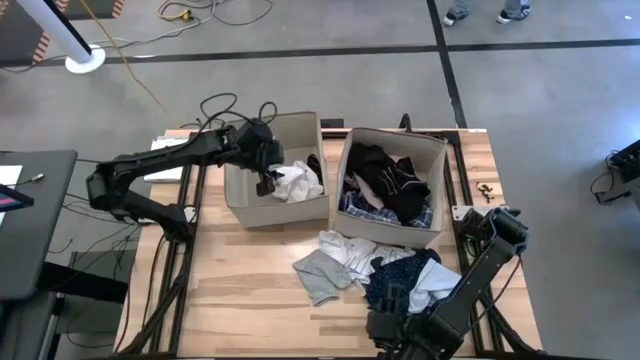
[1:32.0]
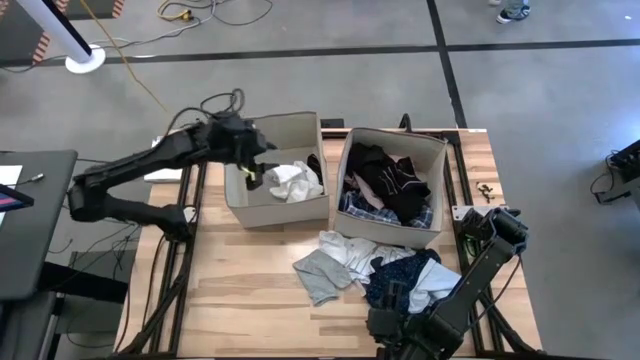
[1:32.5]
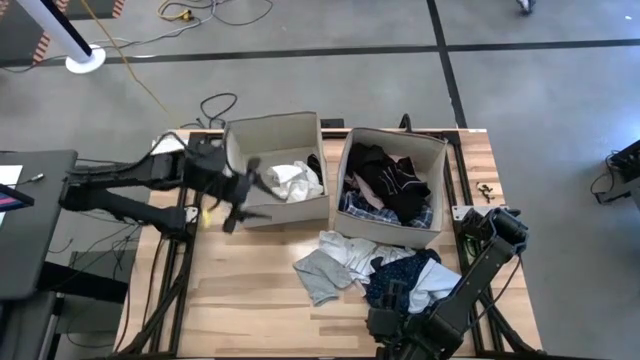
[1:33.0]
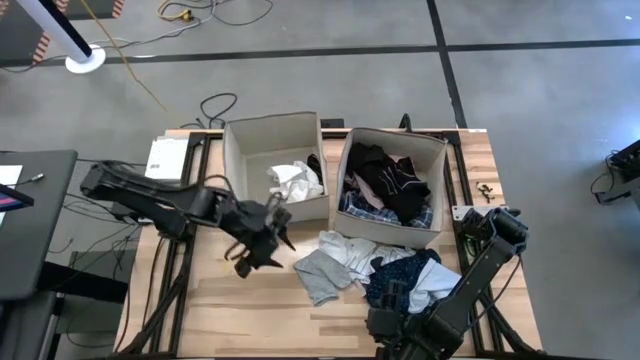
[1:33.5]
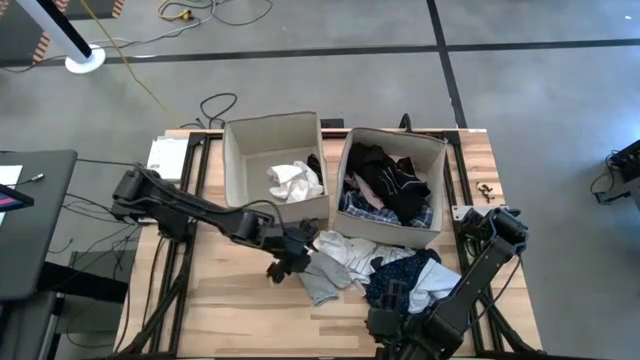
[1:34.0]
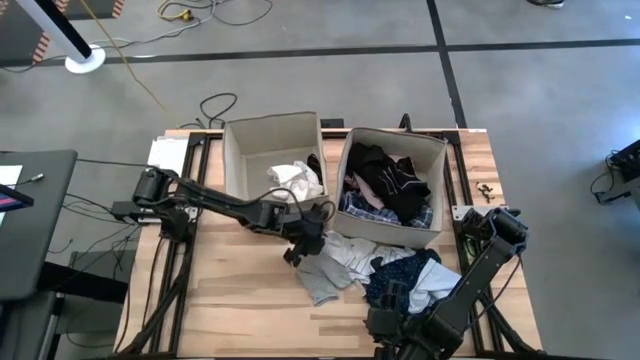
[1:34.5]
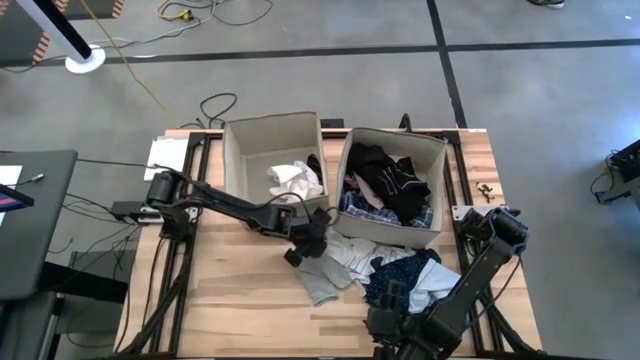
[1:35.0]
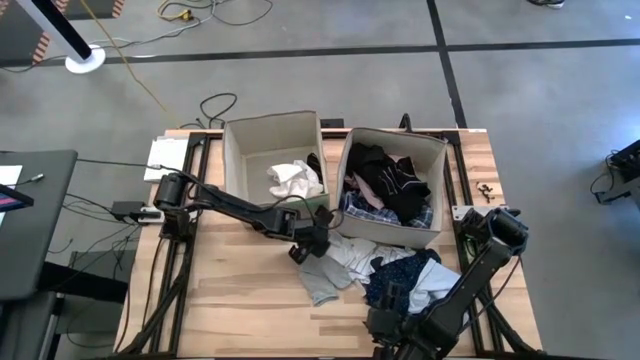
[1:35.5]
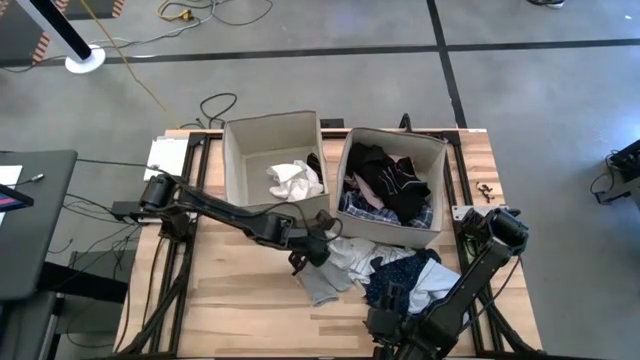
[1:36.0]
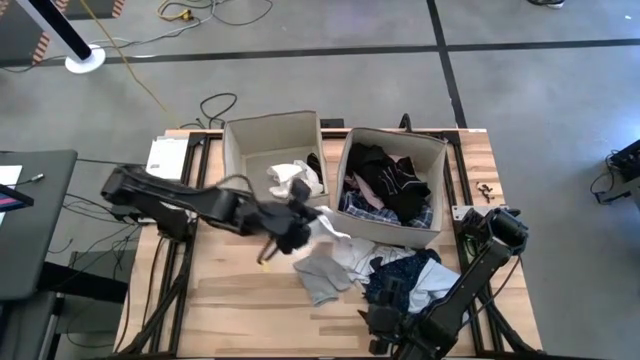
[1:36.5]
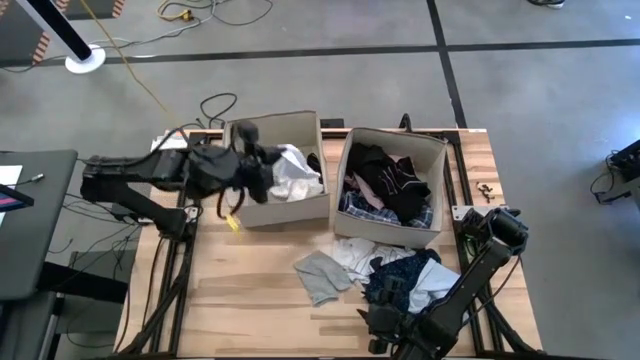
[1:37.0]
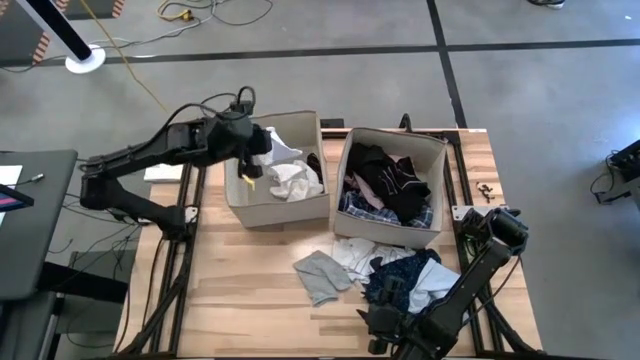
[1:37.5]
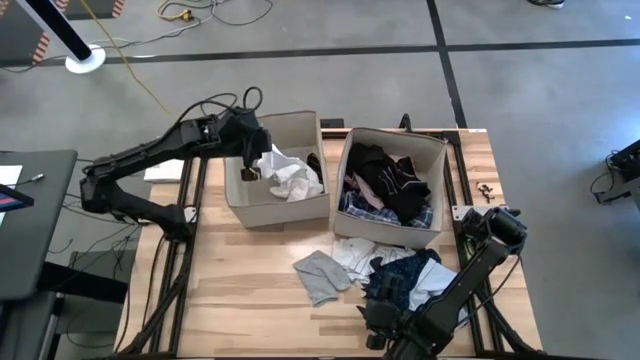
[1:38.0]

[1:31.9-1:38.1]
Task: Sort clothes
Put the white sock into the left white laundry bin

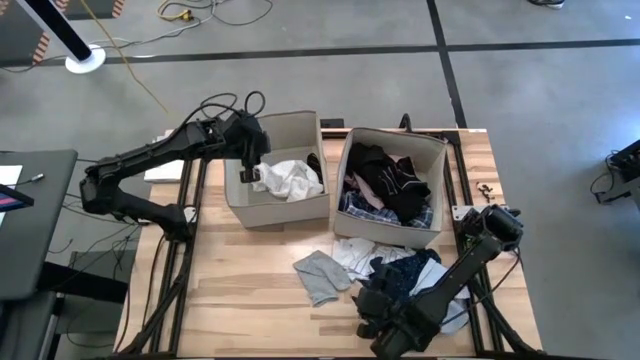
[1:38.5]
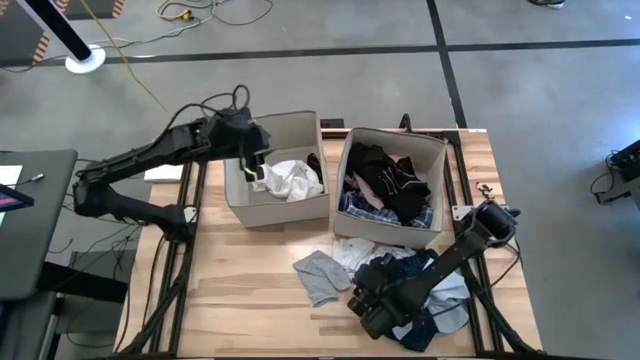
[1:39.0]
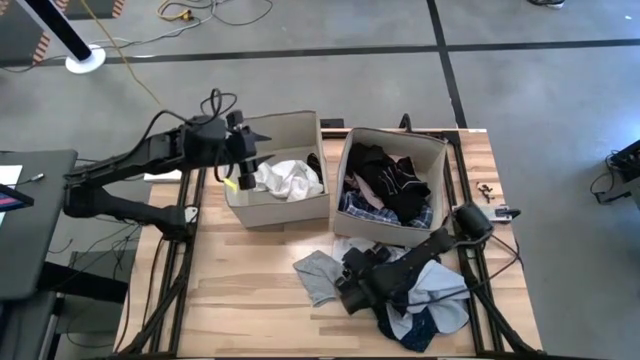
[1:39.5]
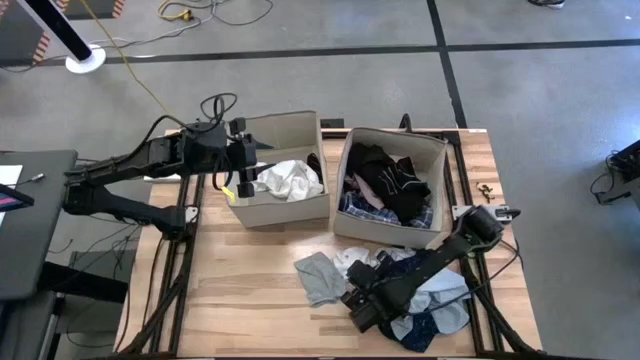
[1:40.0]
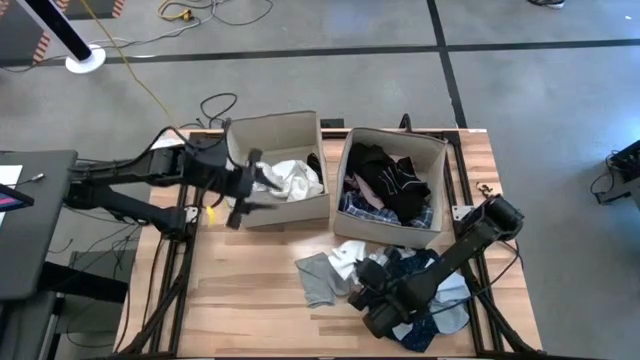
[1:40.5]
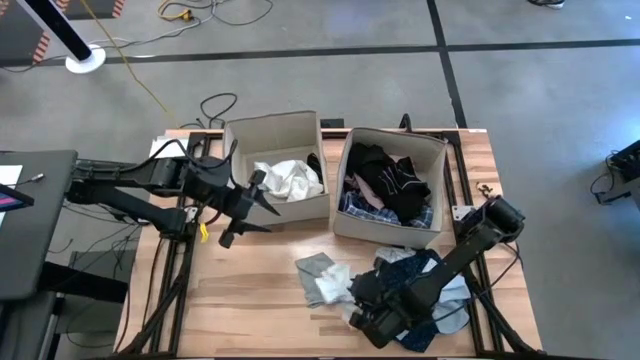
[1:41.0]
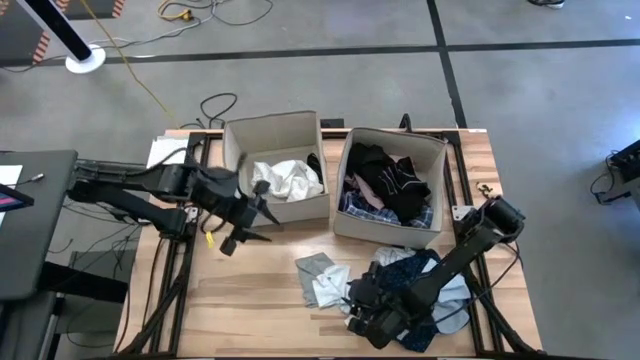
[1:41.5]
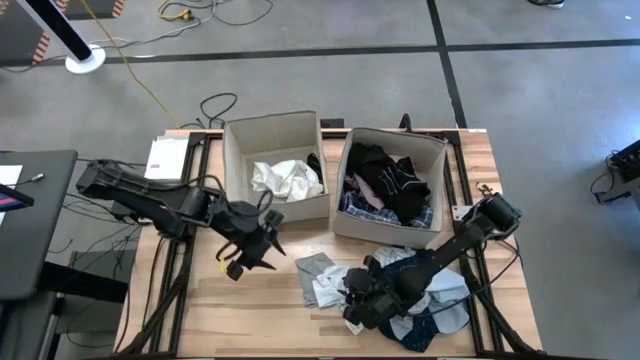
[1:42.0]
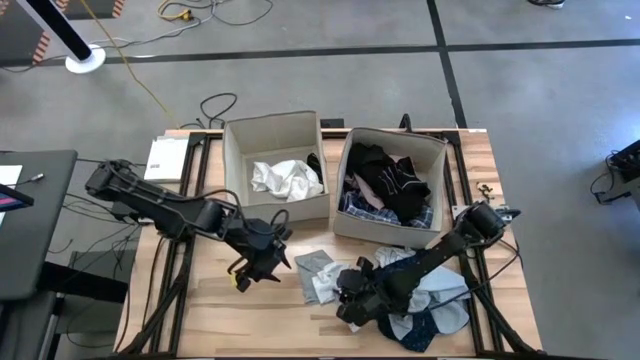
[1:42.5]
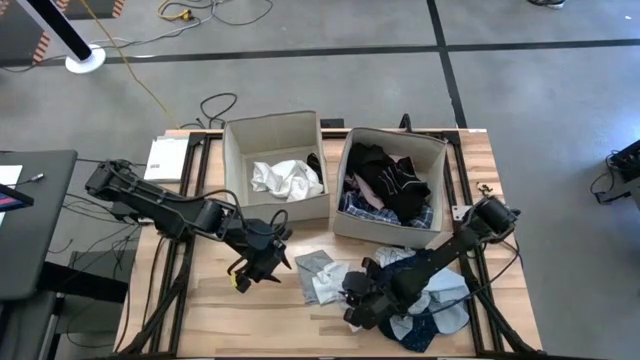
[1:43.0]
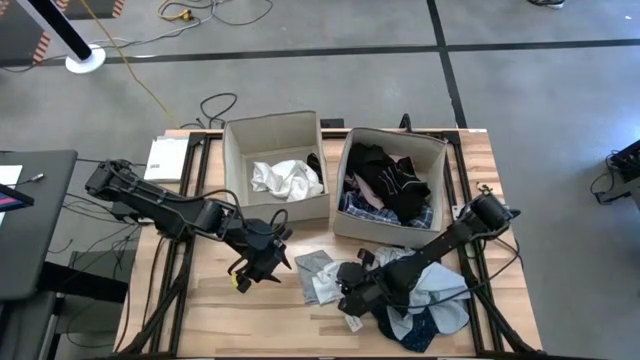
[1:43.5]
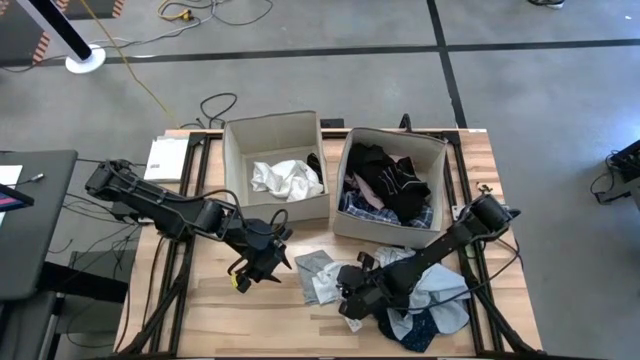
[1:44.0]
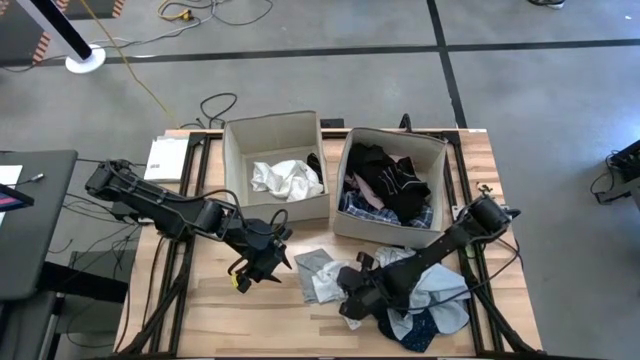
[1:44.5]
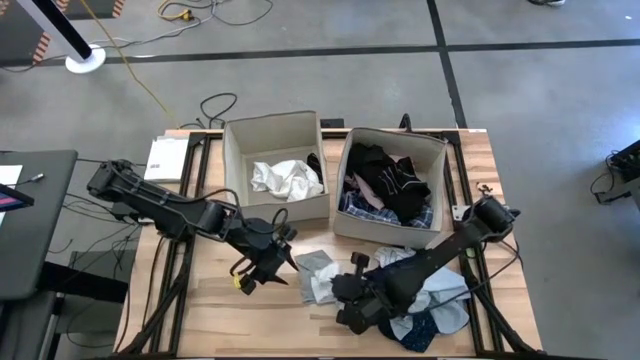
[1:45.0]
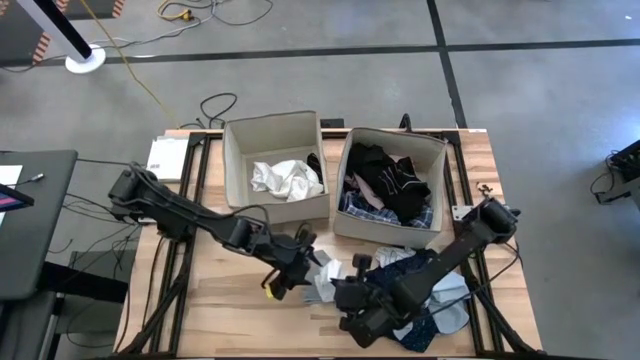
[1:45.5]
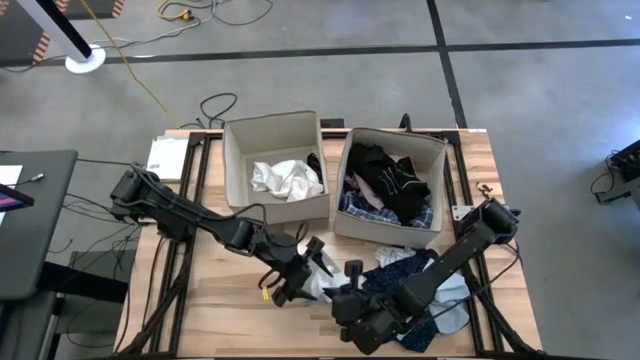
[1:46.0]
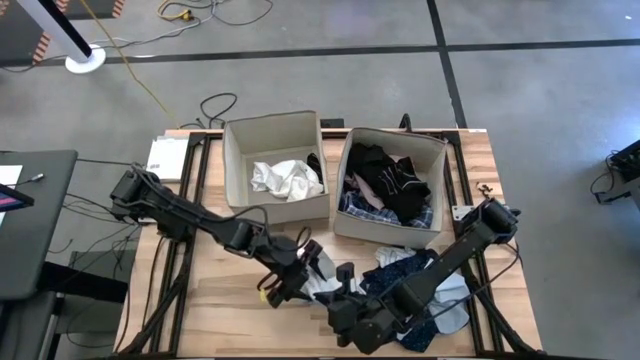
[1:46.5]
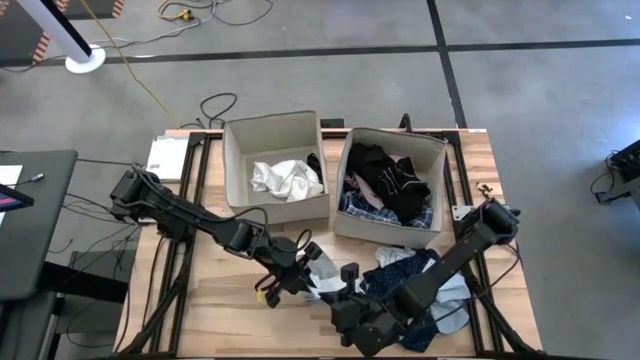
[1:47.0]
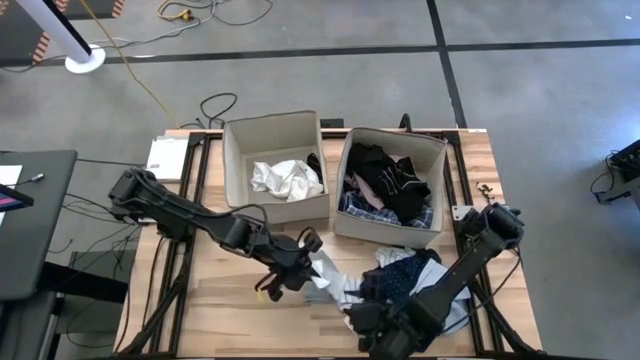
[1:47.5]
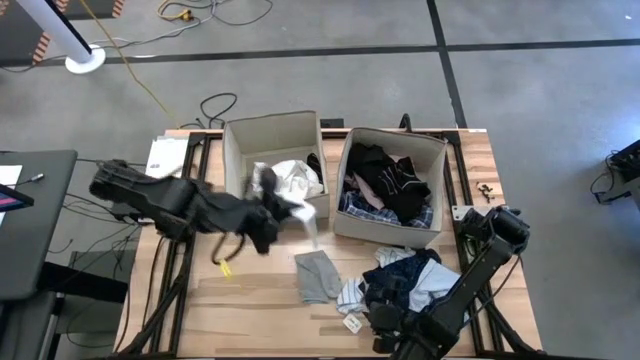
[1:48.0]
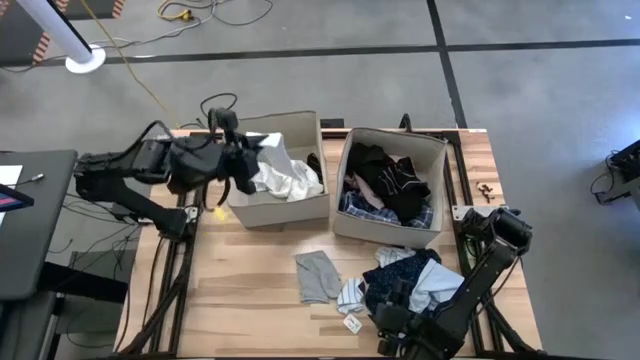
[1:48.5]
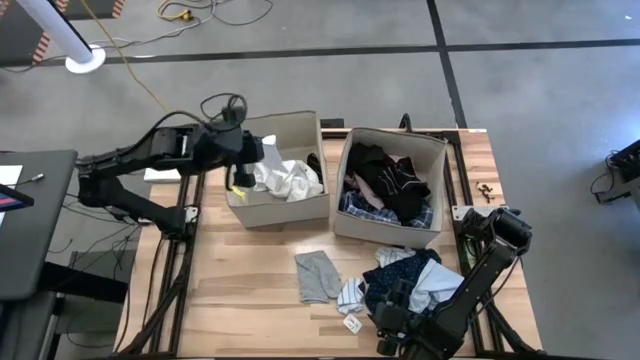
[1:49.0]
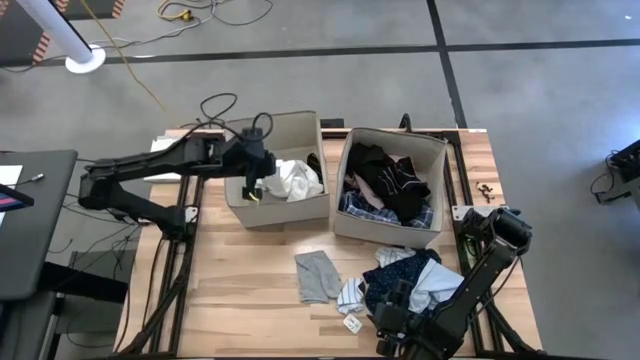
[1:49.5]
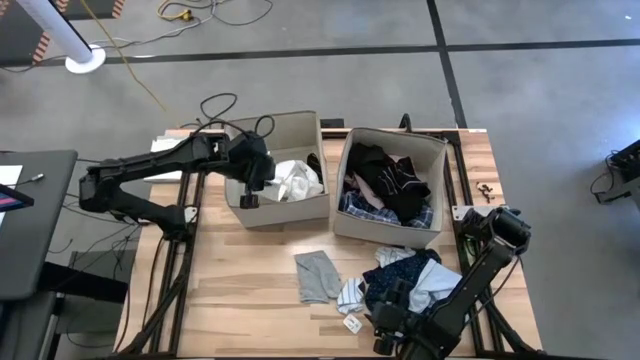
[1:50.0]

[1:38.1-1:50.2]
Put the sock into the left white laundry bin

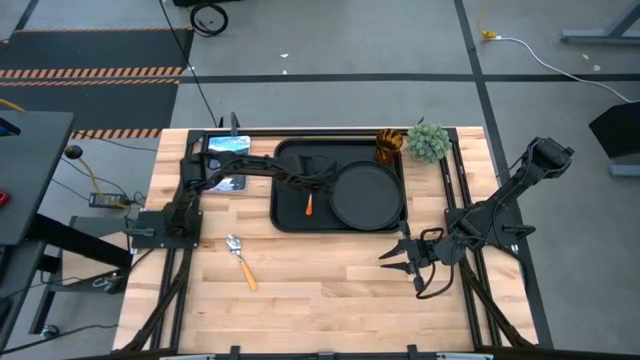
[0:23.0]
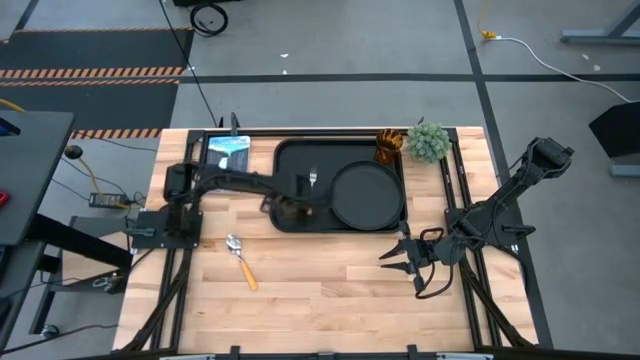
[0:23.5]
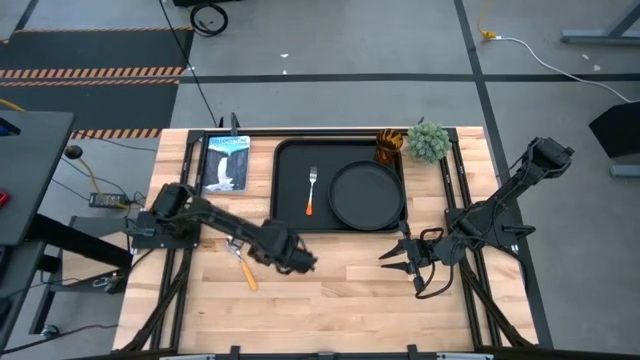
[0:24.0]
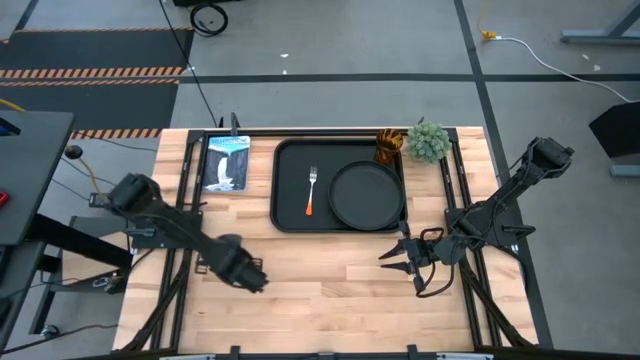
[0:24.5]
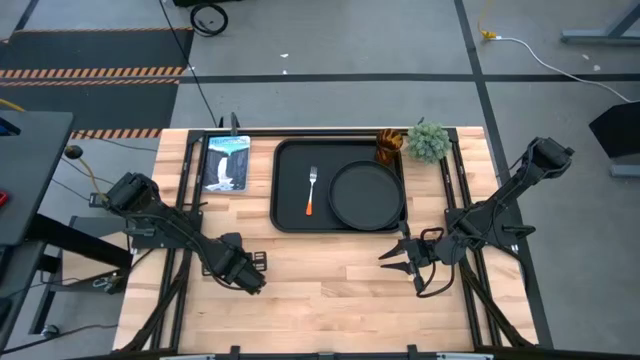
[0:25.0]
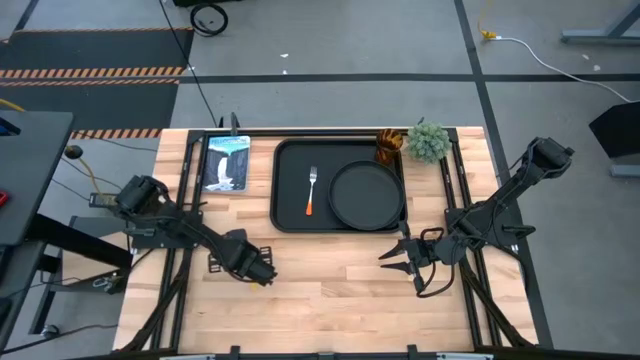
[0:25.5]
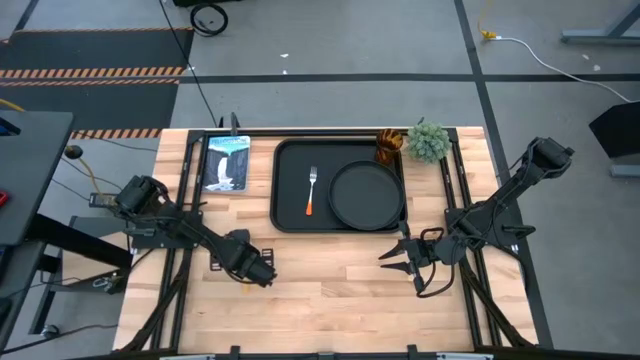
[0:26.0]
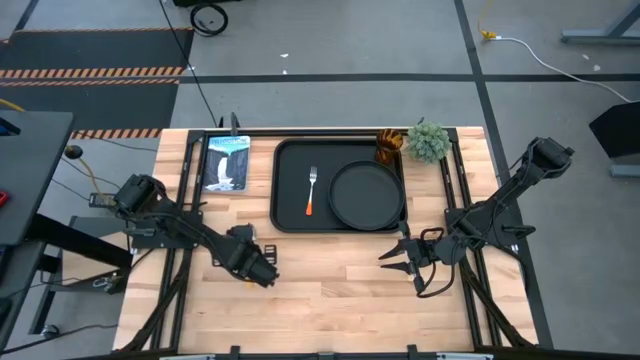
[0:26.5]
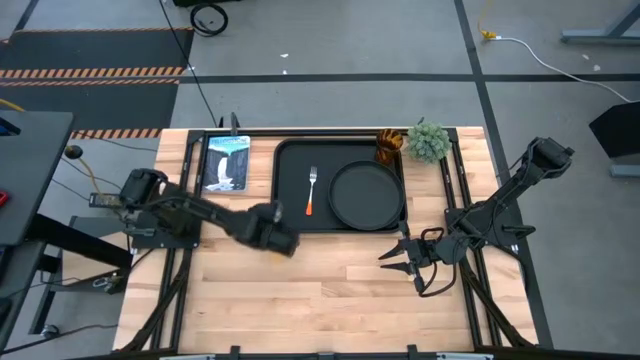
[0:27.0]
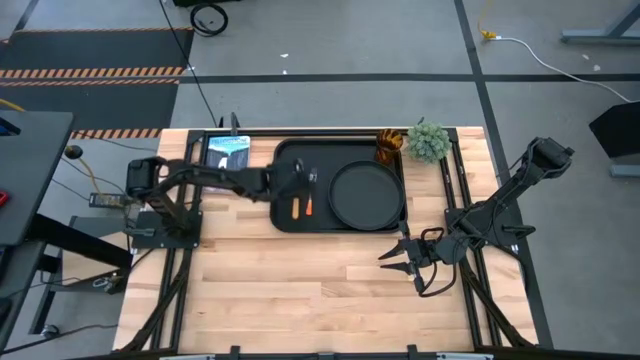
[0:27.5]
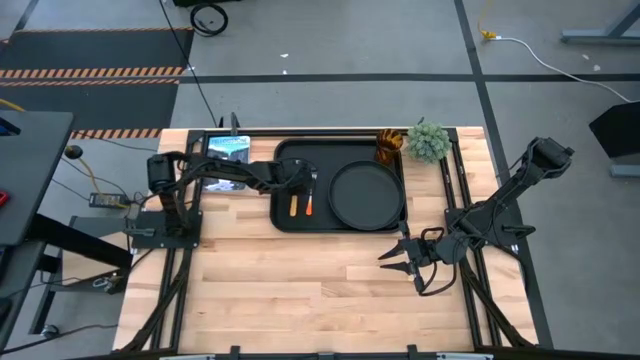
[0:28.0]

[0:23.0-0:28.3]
Task: Pick and place plate/cup/fork/spoon on tray
Put the yellow spoon on the black tray to the left of the orange fork
